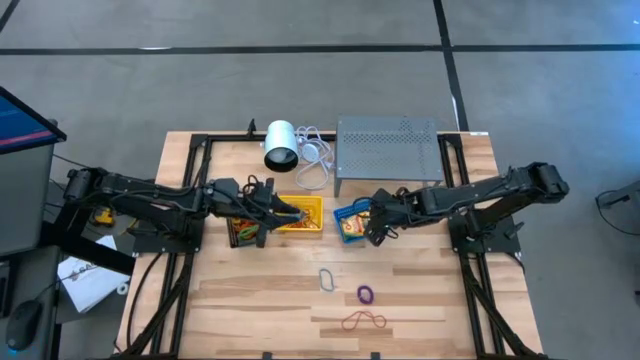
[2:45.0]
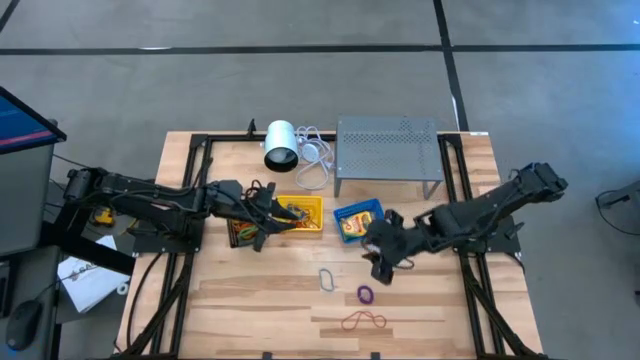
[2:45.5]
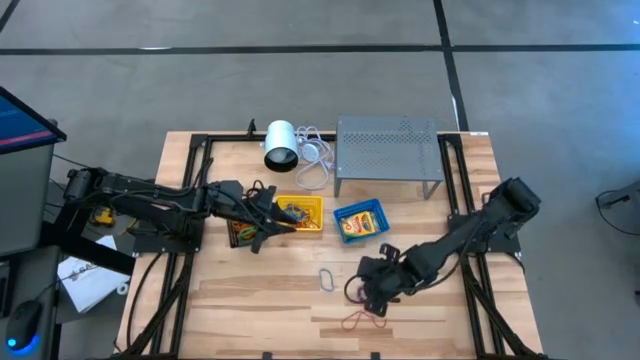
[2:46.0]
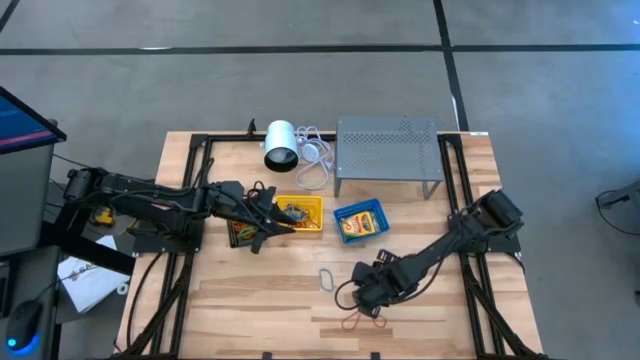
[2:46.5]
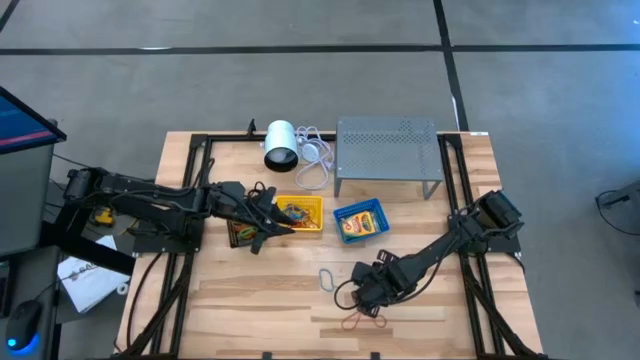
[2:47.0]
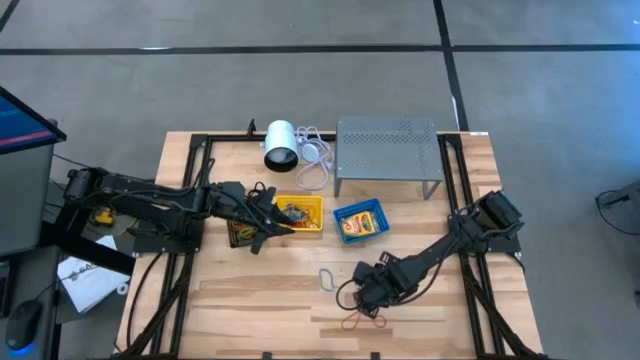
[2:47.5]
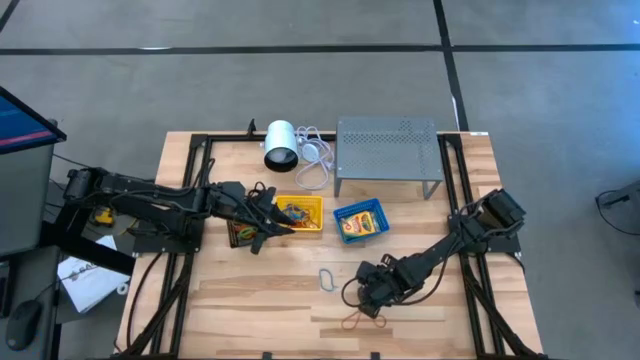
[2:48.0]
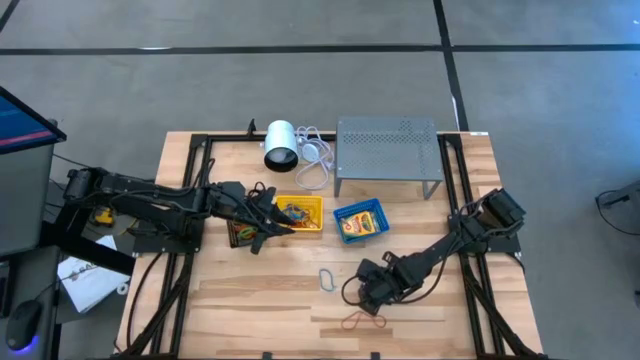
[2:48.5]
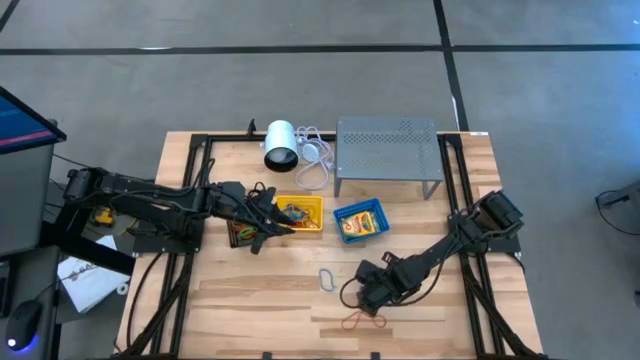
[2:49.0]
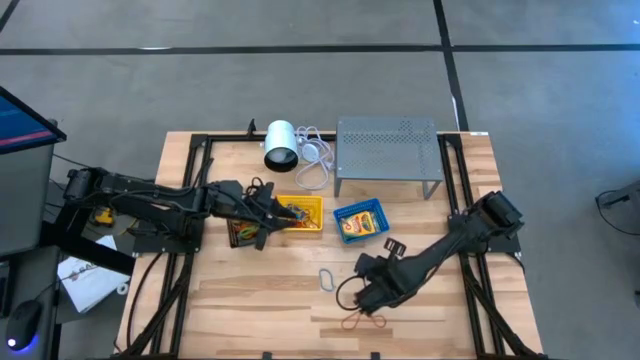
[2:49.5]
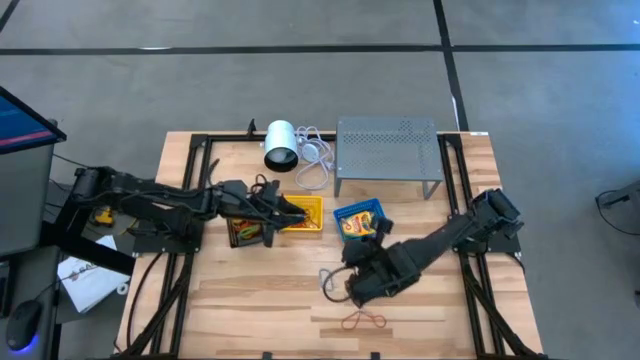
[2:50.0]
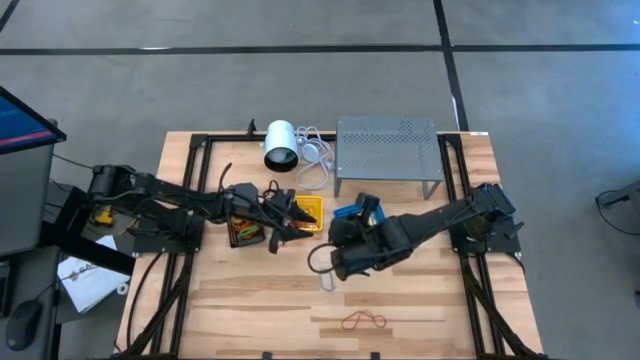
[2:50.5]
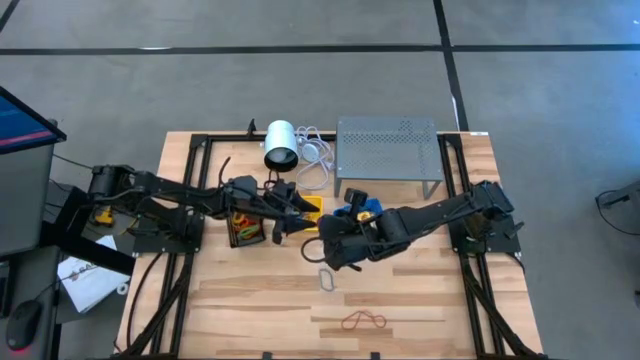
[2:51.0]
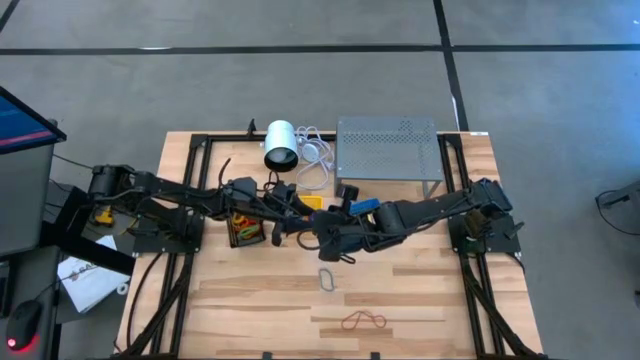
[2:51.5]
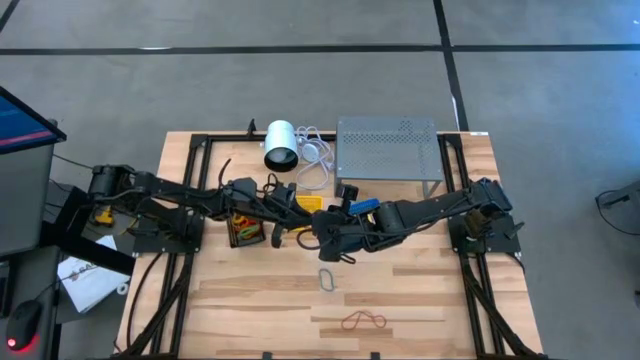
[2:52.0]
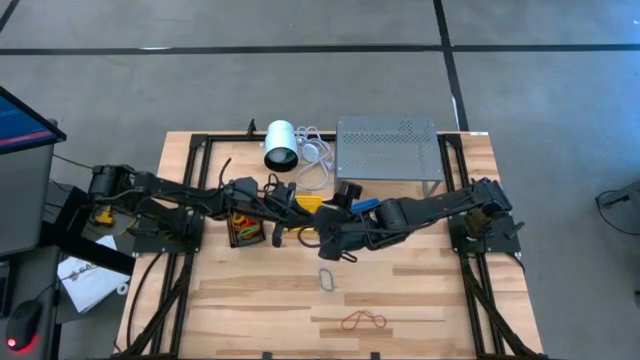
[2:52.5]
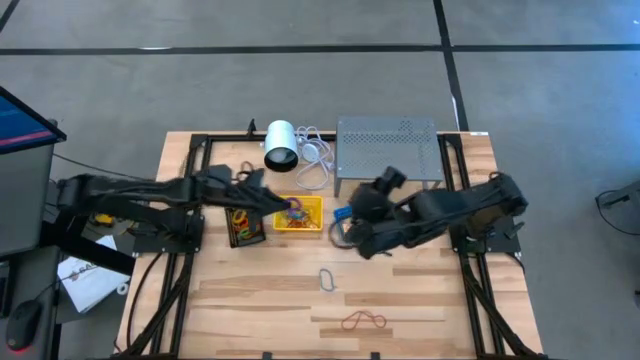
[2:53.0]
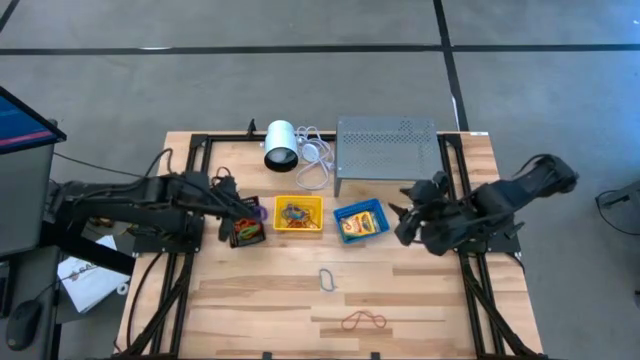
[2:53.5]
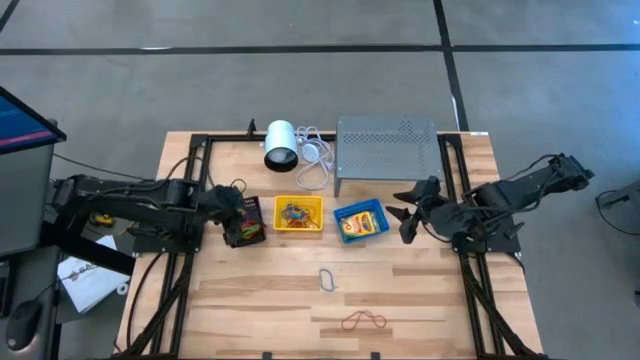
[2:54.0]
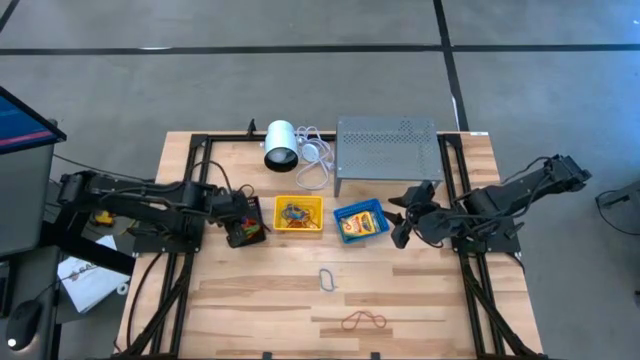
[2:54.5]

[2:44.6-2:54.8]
Task: Pick & Place Office Desk Supplies
Put the violet spring keychain into the black bin

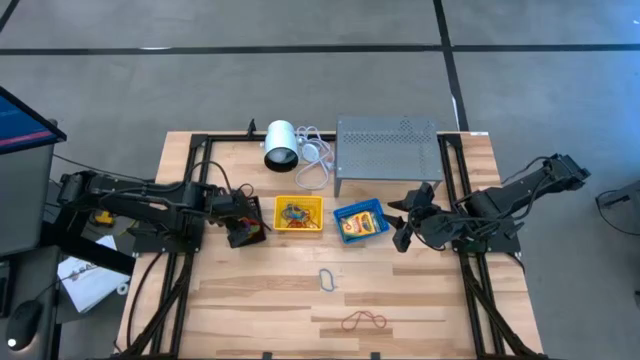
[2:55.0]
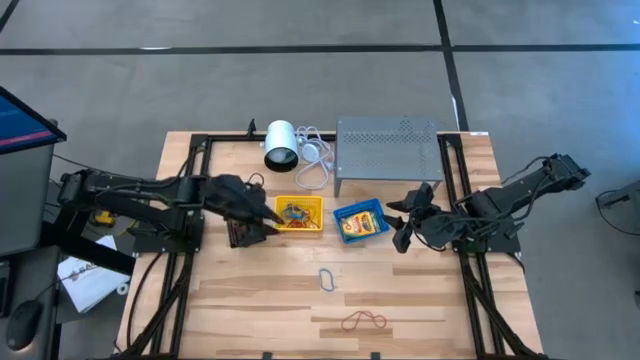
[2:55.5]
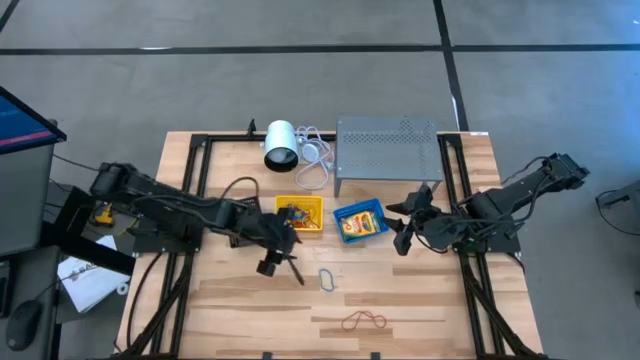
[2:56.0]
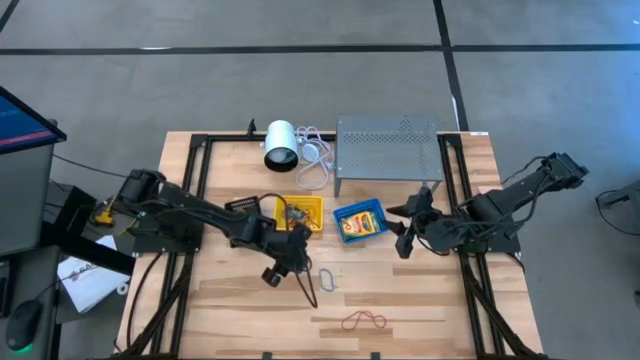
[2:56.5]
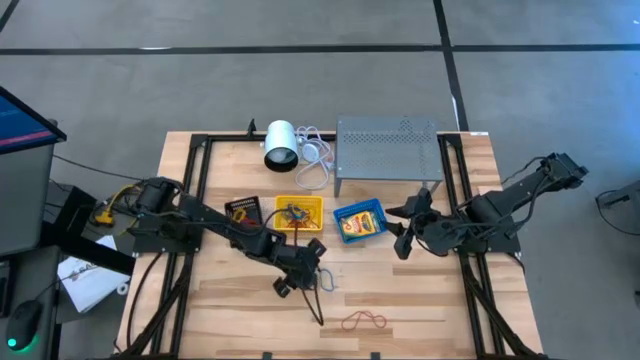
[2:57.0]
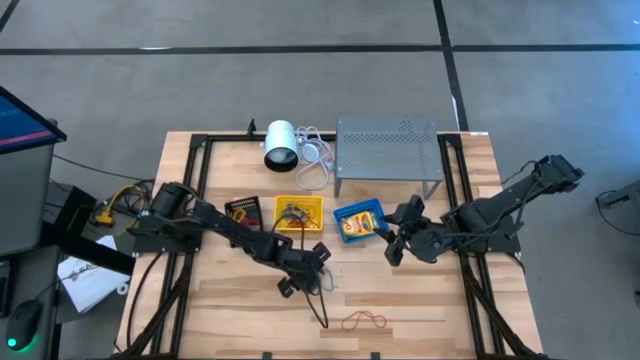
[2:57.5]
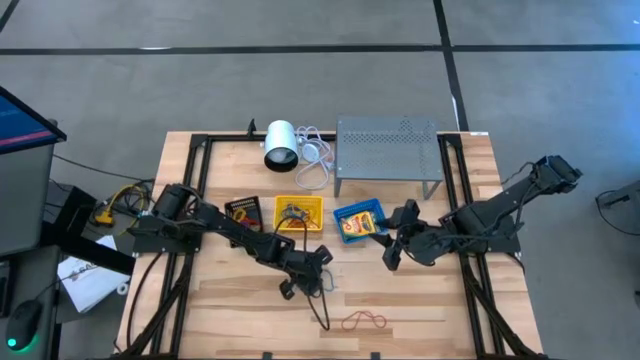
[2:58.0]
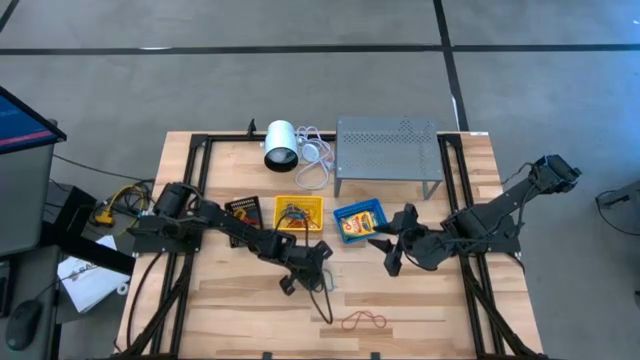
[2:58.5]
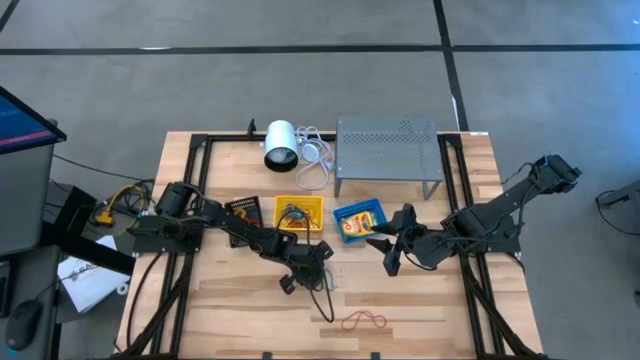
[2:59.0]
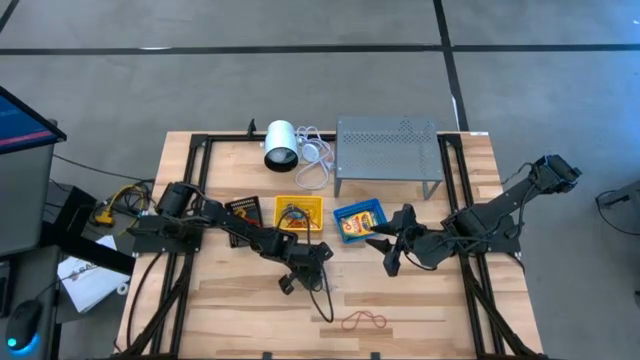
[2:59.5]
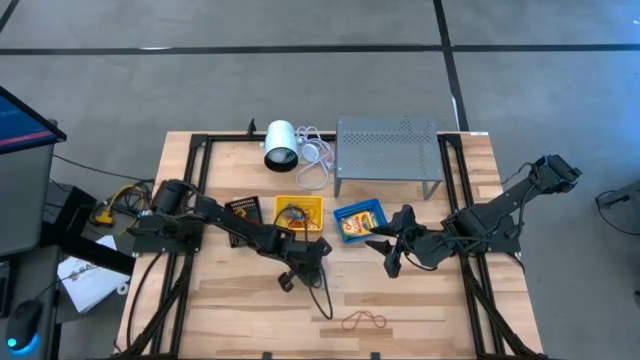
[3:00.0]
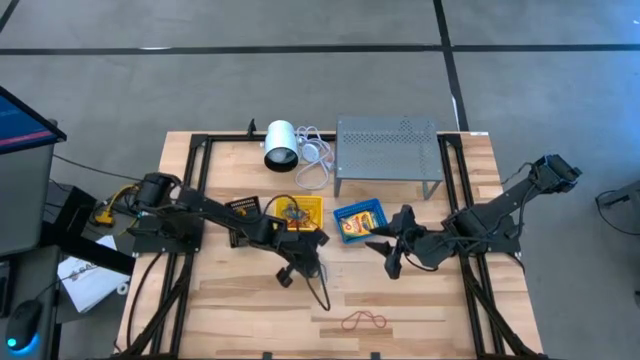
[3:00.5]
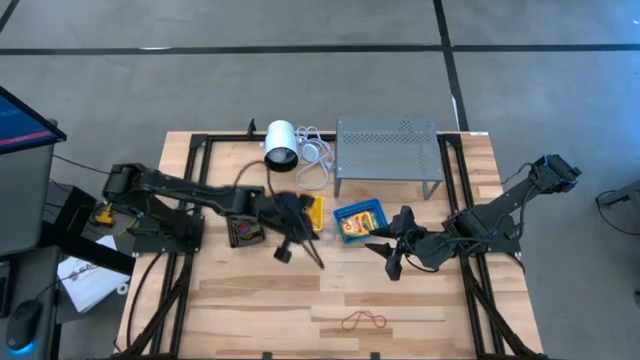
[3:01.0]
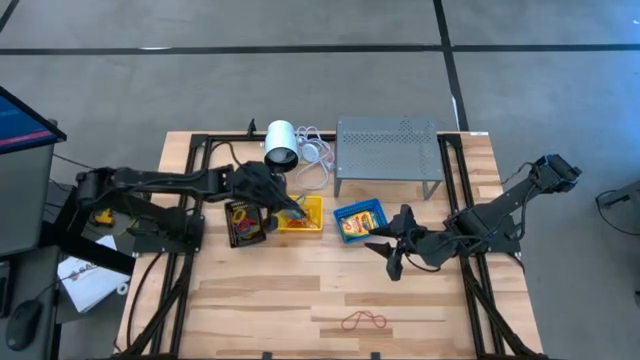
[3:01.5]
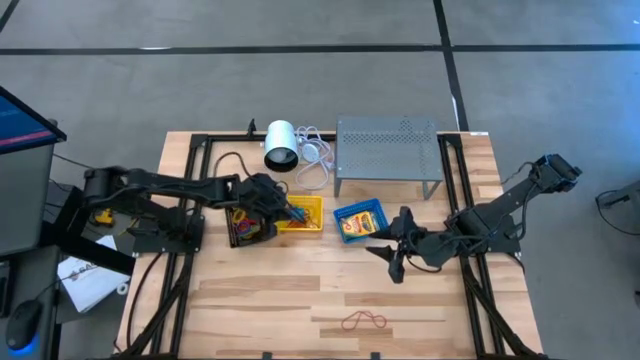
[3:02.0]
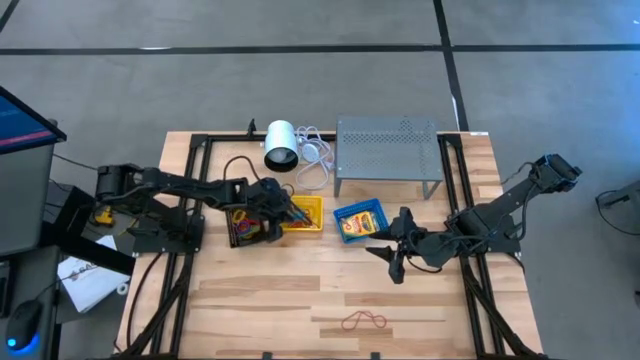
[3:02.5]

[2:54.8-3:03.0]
Put the blue rubber band into the yellow bin

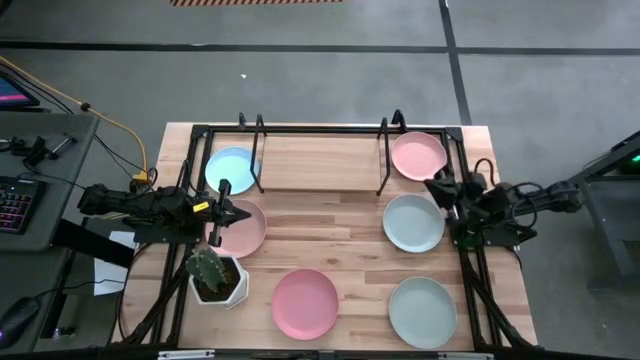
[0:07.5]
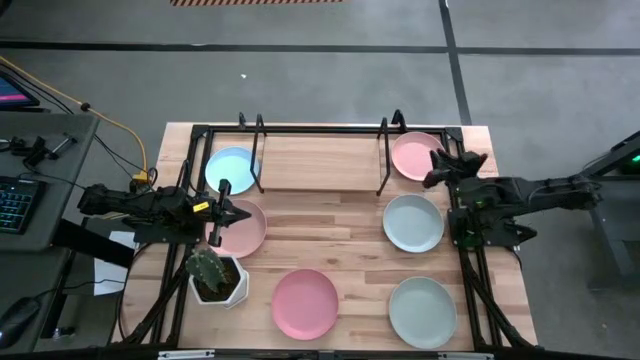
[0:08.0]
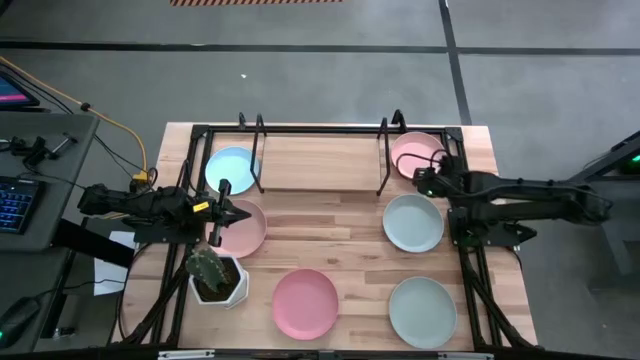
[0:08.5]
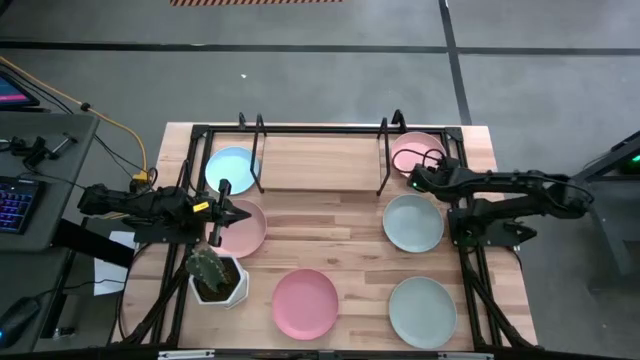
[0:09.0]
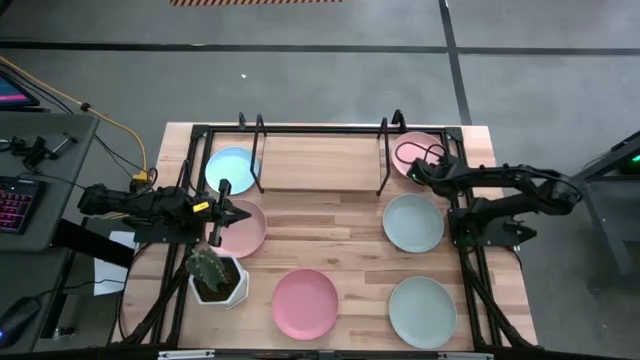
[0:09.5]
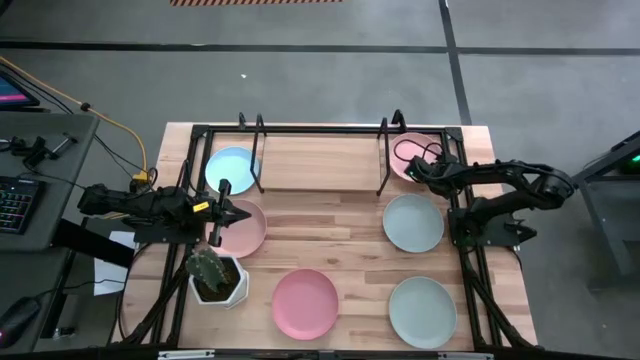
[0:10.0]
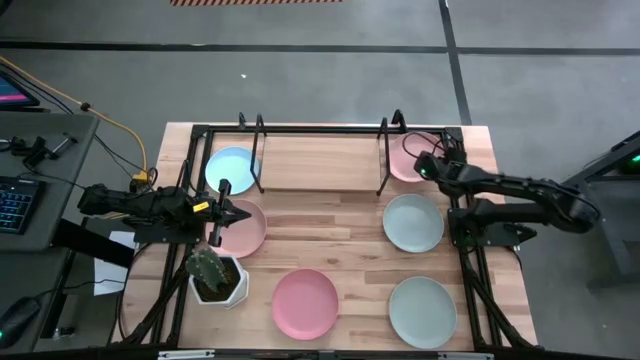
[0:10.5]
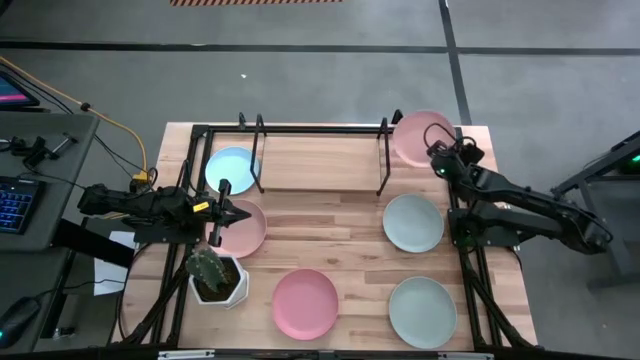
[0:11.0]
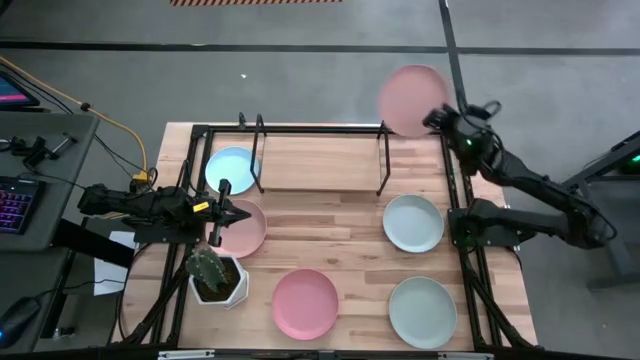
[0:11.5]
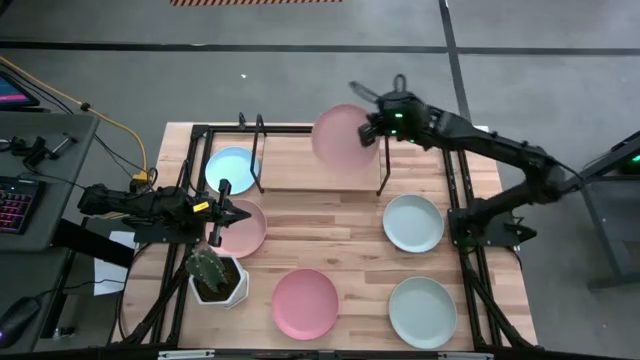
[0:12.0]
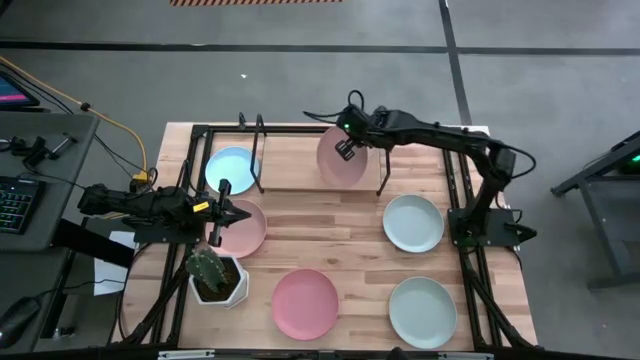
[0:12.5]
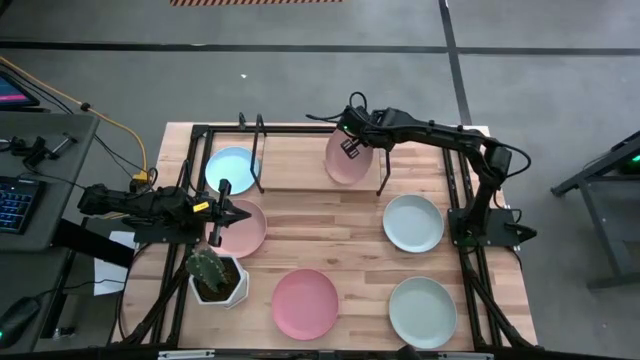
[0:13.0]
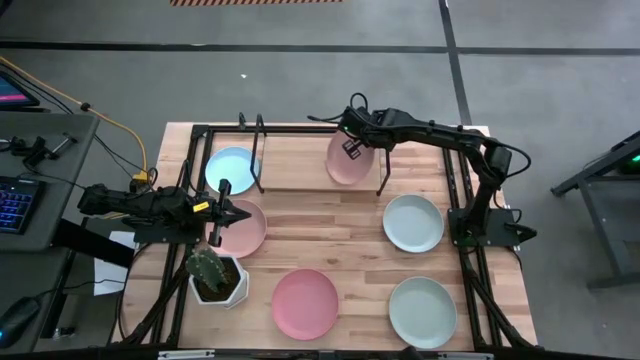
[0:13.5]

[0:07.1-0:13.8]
Task: Place and stack plates onto a shelf
Put the rifgt light pink plate on the shelf
